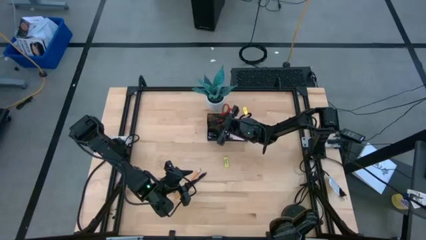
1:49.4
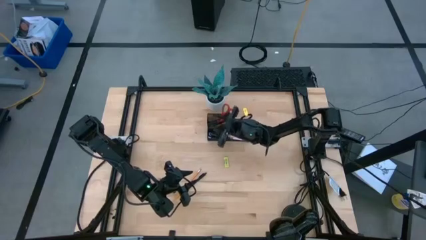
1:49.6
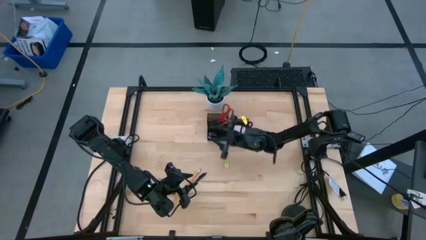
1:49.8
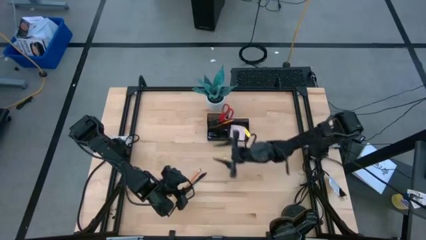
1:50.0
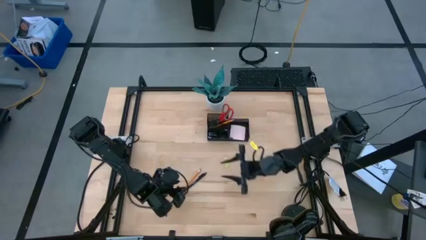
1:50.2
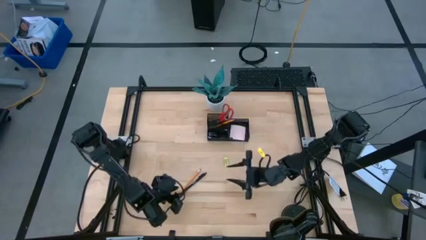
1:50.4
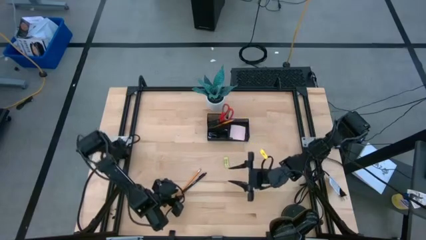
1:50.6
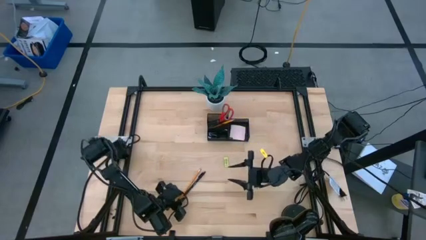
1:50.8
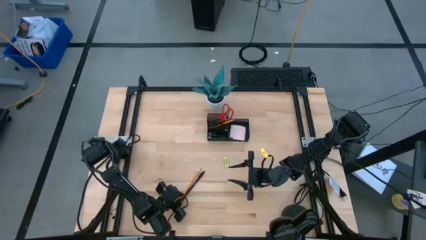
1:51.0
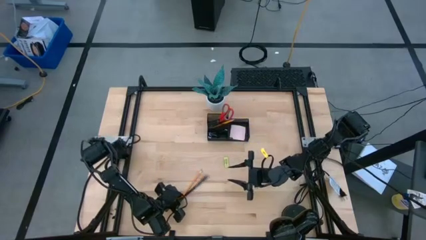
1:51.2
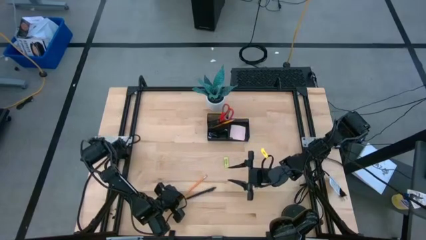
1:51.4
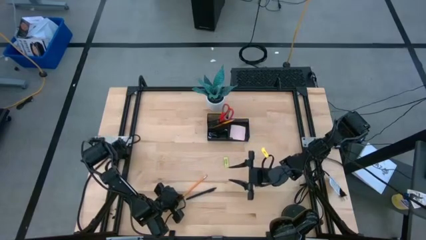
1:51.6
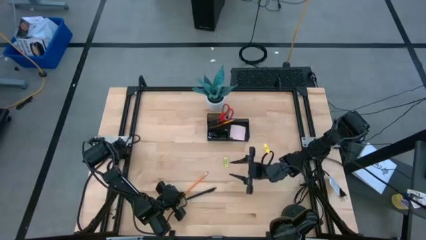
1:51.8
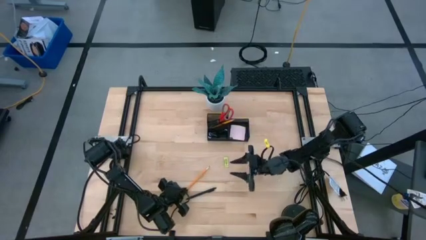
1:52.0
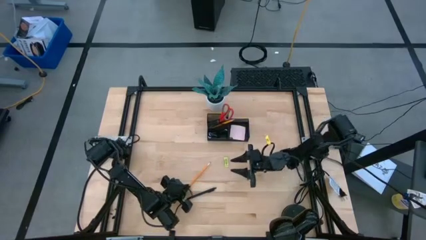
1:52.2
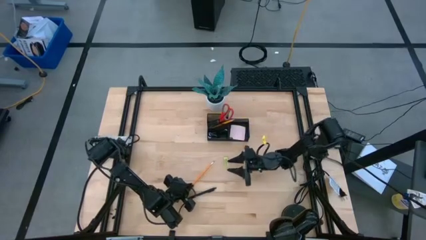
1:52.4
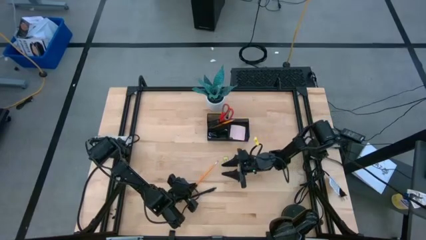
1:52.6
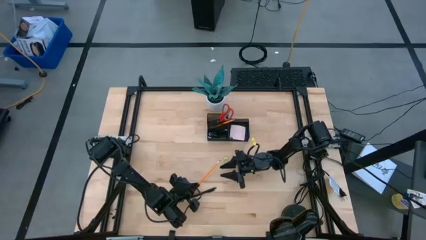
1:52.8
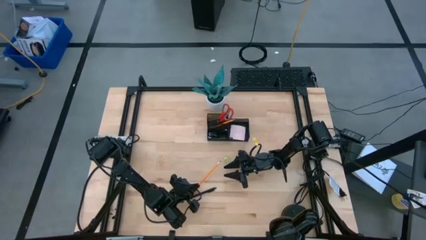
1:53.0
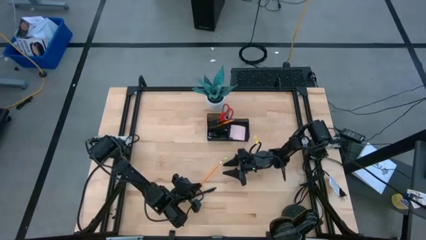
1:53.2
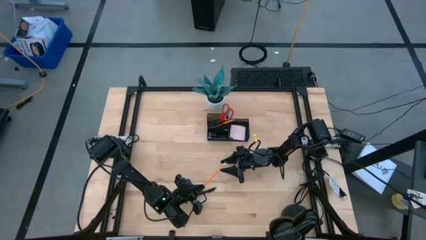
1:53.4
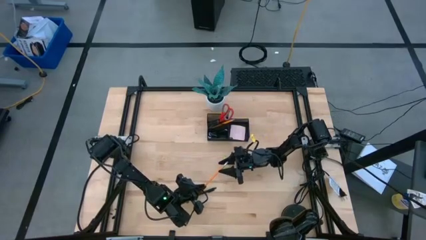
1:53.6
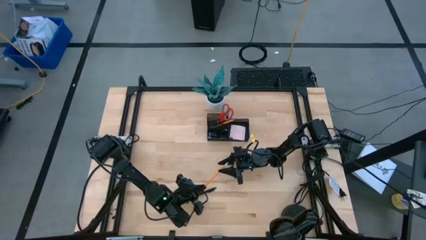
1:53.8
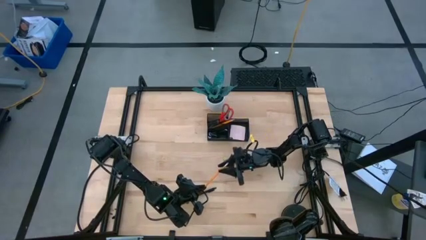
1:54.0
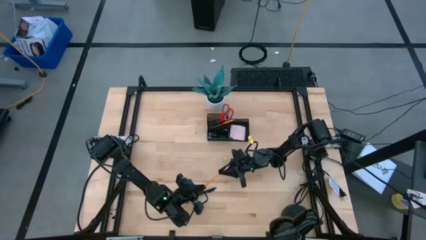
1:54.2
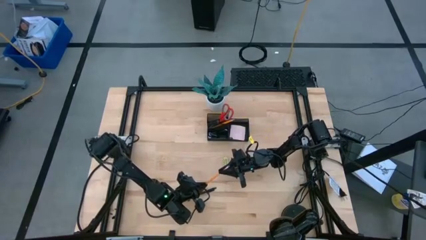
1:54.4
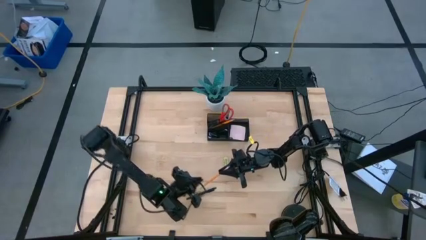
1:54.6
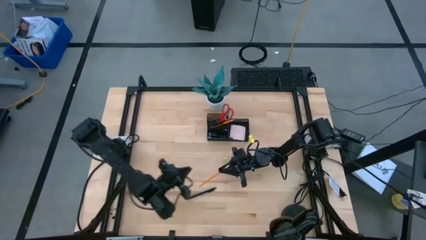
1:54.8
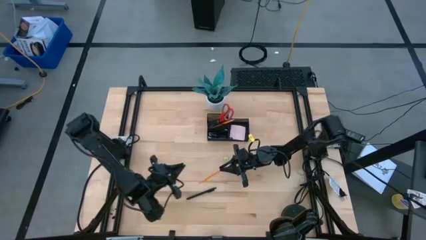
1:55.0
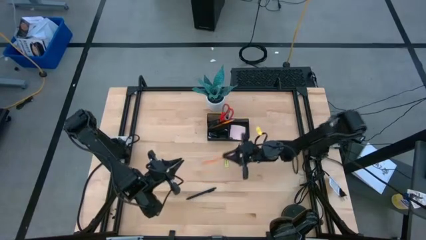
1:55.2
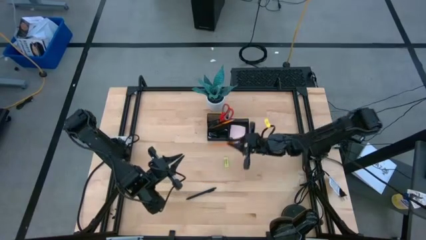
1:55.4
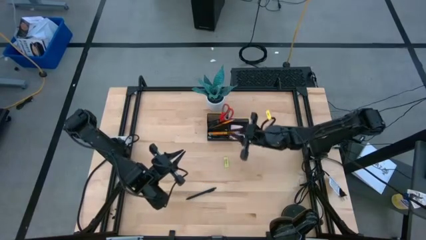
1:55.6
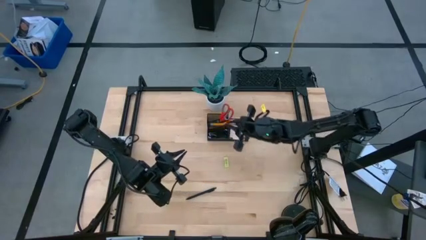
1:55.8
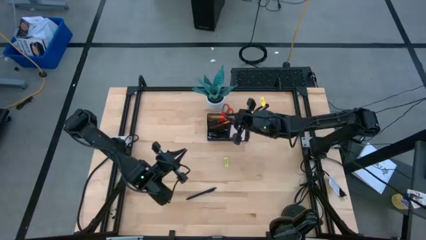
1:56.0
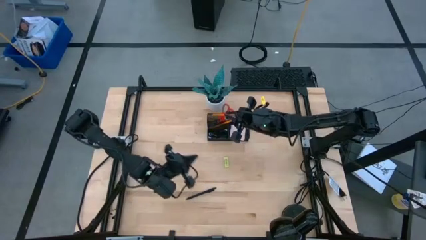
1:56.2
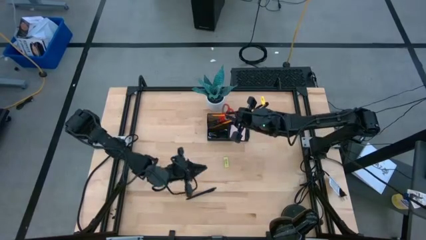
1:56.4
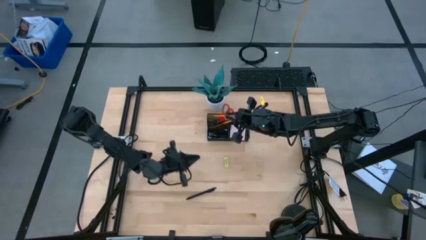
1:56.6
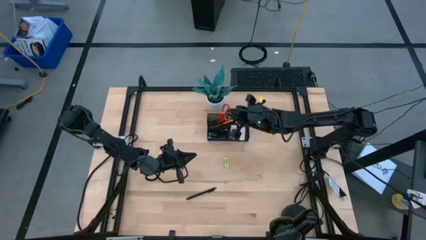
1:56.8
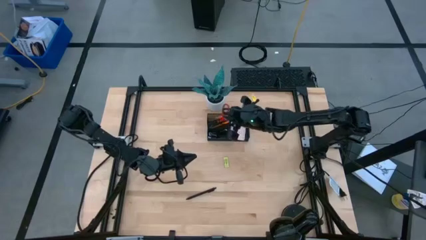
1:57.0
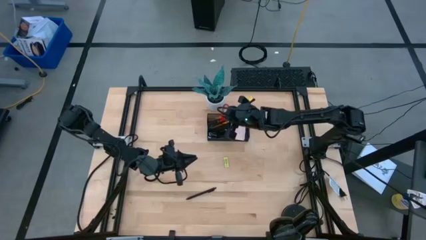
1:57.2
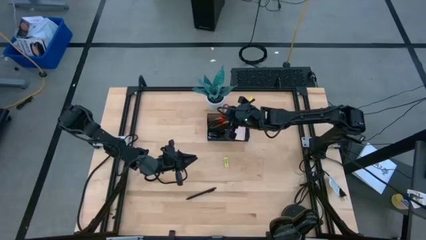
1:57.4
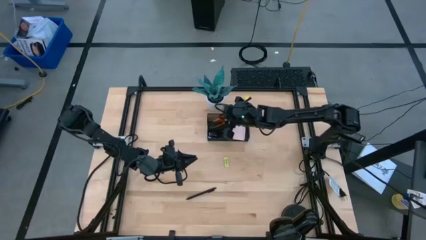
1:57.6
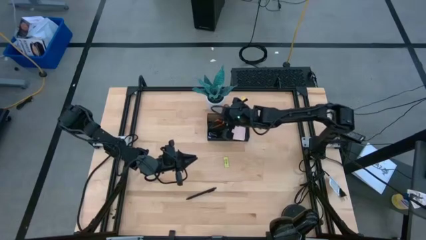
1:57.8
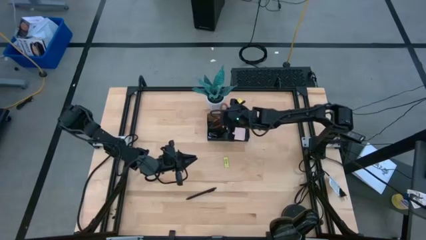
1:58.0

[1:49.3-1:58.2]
Task: Pick and place office supplies into organizer
Put the orange pencil into the black desk organizer

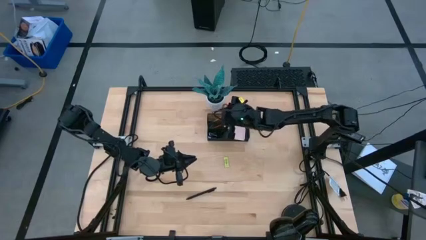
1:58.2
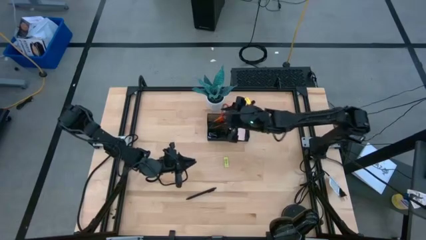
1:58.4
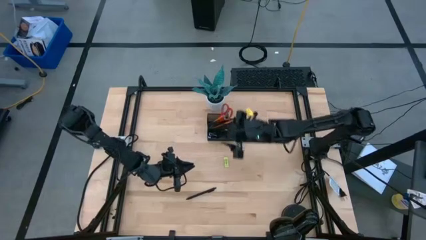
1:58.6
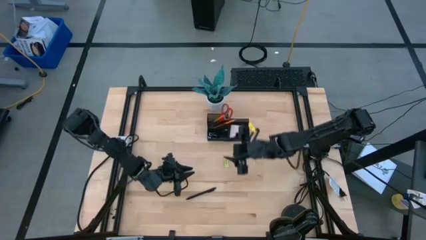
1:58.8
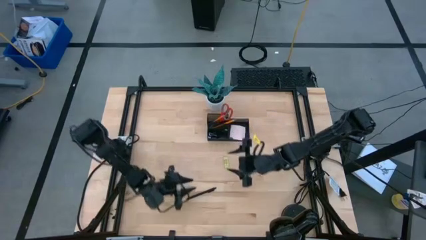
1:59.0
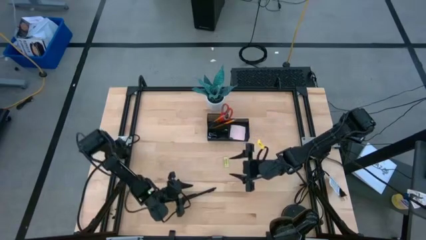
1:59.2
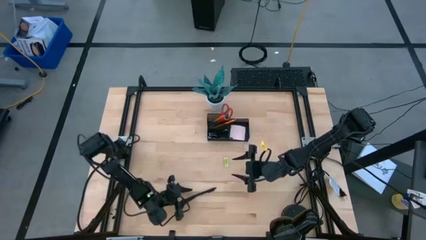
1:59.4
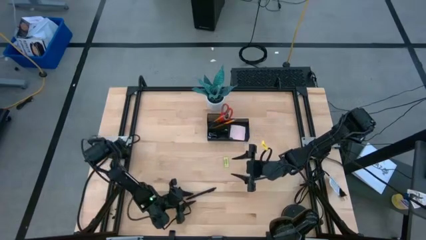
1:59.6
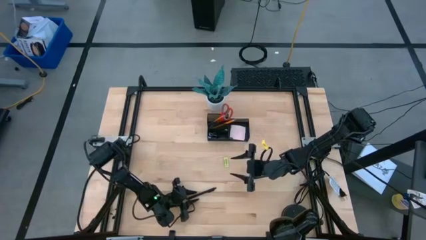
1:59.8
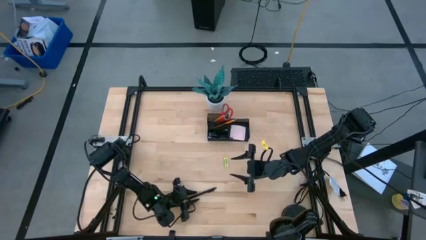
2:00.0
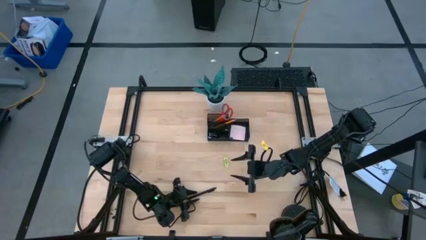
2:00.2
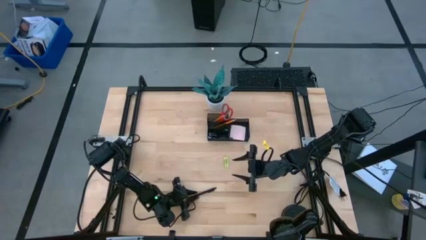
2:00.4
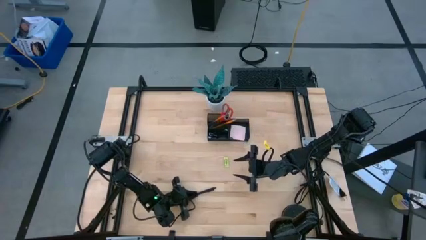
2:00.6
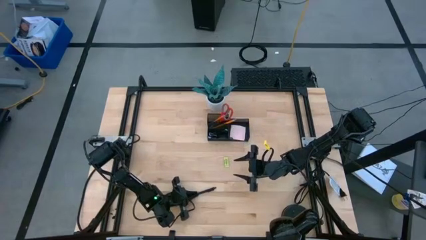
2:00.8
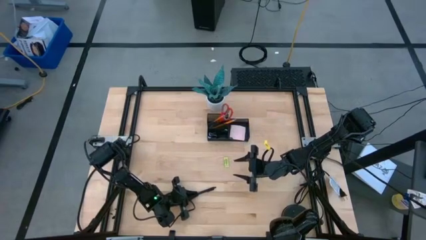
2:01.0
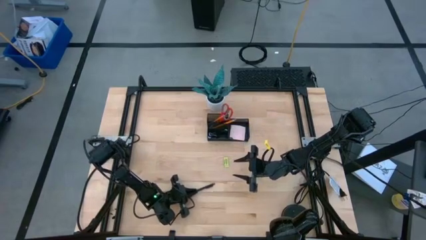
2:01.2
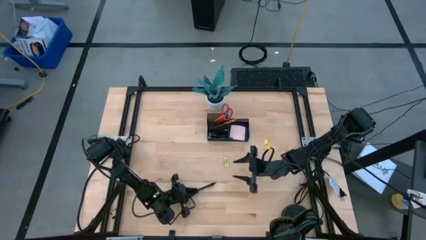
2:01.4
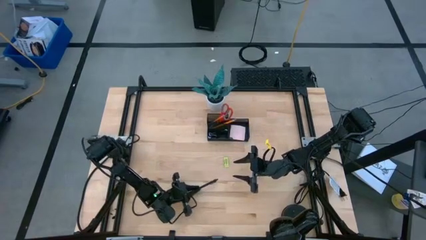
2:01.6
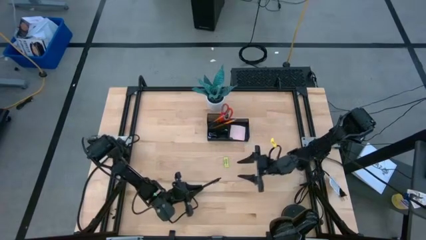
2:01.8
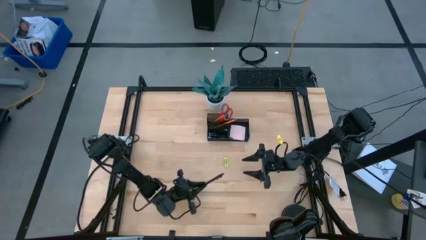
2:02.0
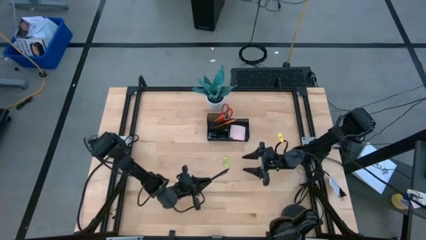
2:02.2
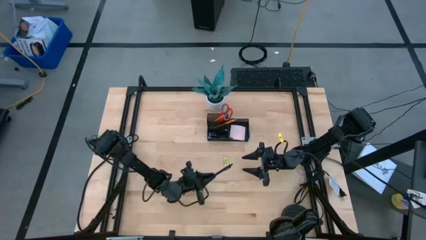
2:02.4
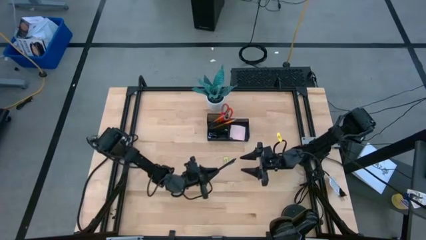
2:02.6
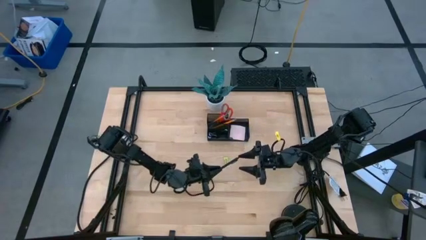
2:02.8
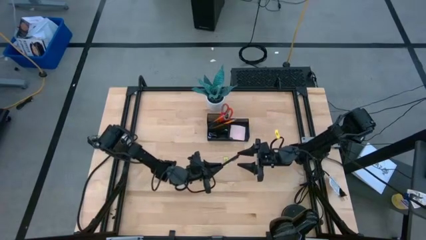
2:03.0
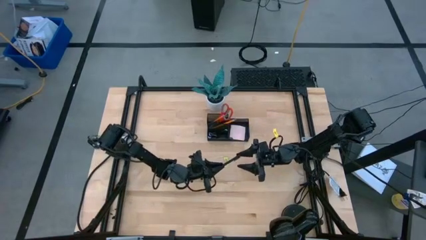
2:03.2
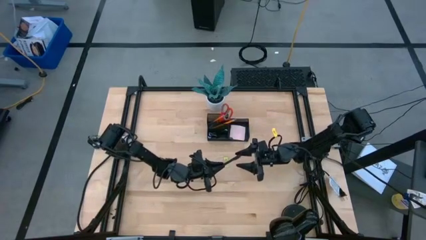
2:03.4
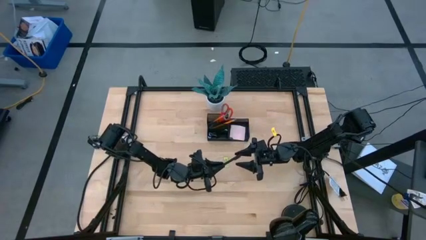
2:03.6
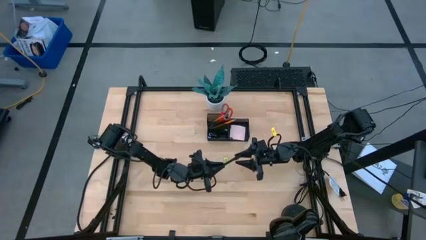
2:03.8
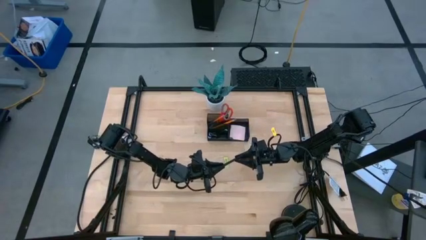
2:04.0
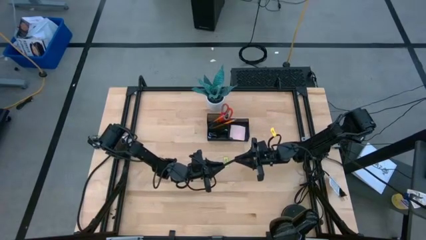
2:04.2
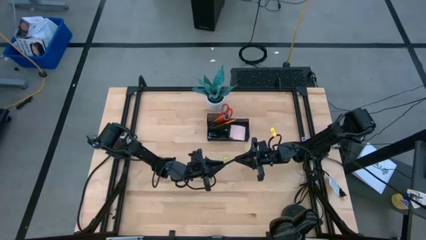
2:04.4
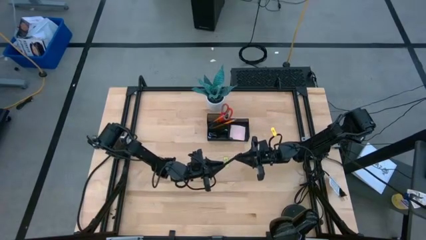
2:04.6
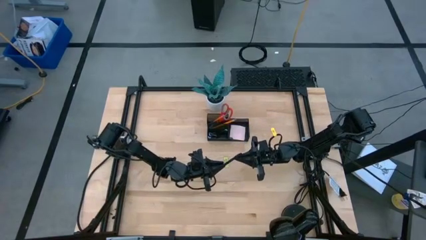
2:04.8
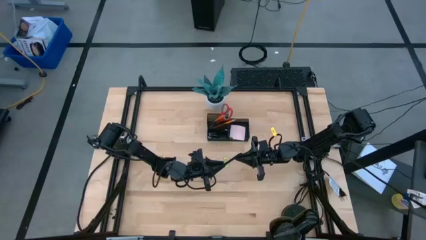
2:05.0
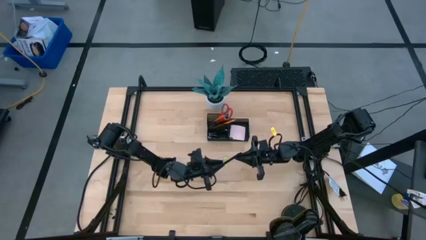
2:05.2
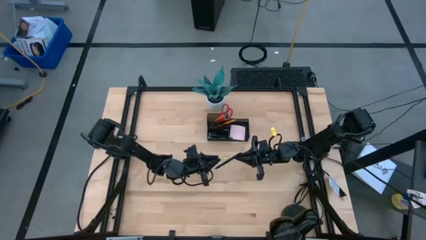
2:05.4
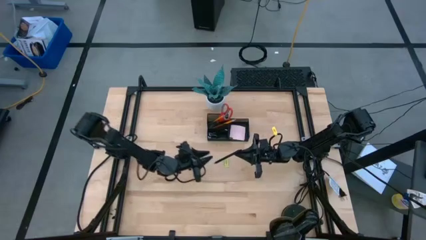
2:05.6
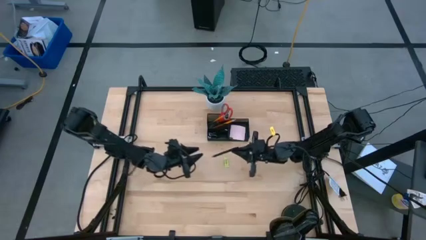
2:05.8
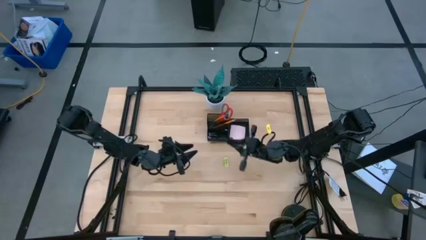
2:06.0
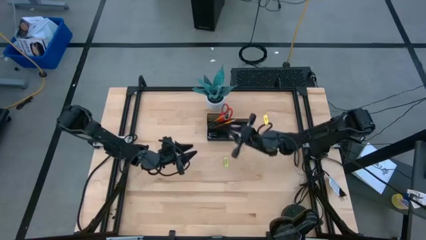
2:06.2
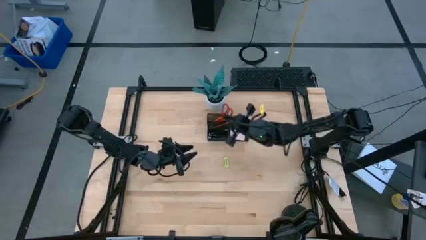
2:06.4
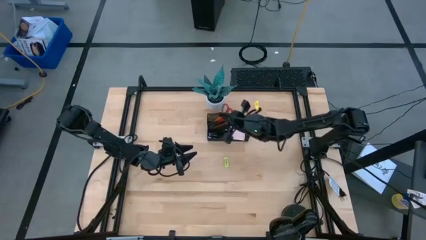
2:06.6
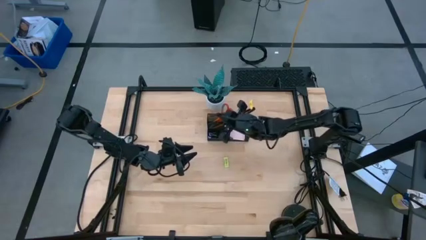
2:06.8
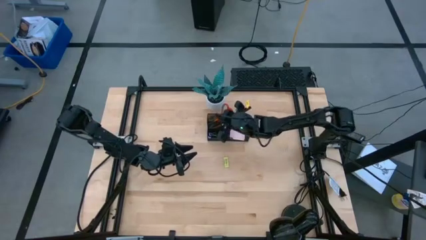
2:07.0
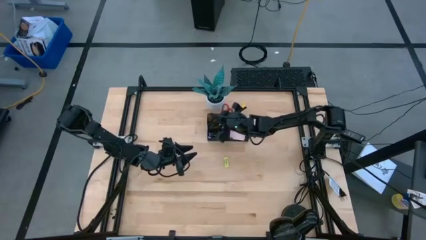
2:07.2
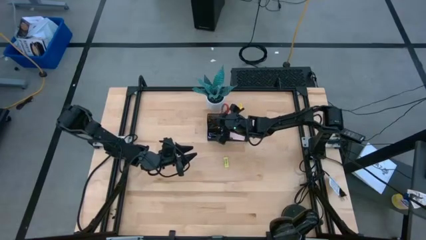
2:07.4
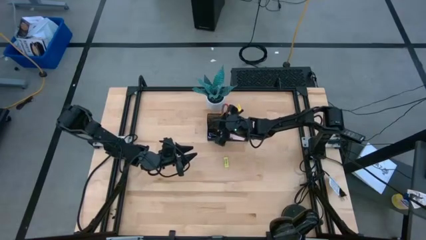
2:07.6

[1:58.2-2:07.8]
Put the black pen into the black desk organizer
